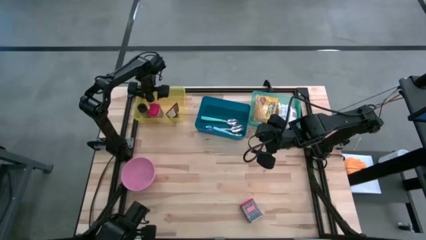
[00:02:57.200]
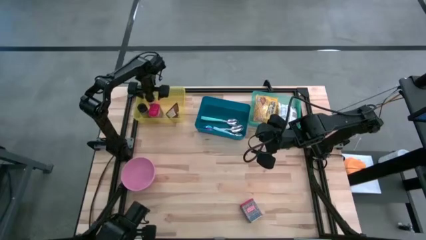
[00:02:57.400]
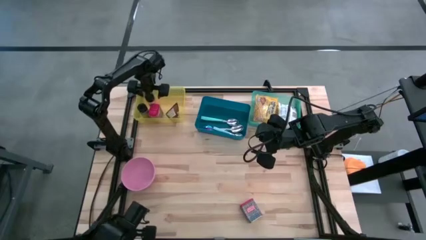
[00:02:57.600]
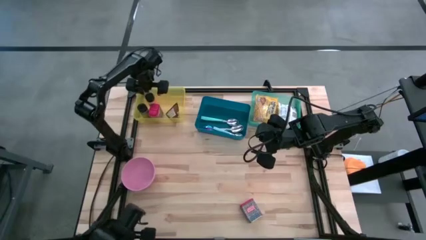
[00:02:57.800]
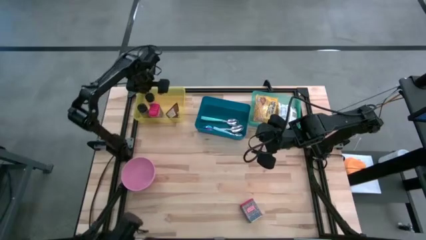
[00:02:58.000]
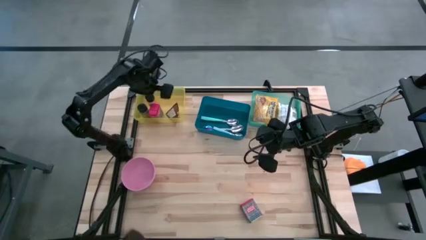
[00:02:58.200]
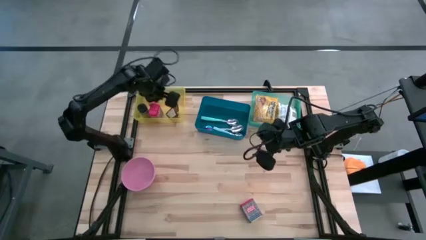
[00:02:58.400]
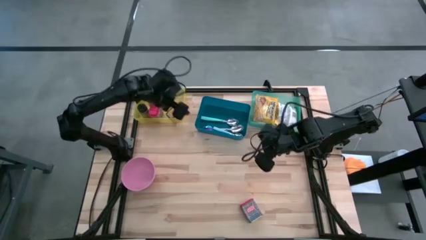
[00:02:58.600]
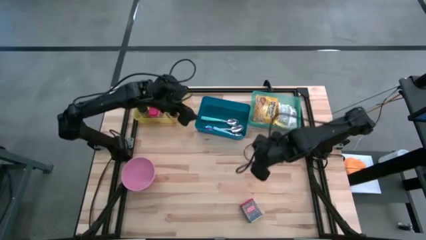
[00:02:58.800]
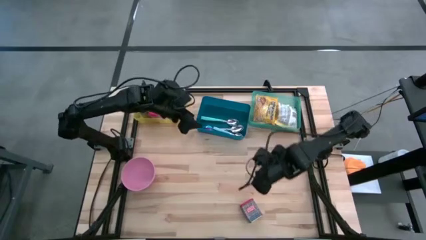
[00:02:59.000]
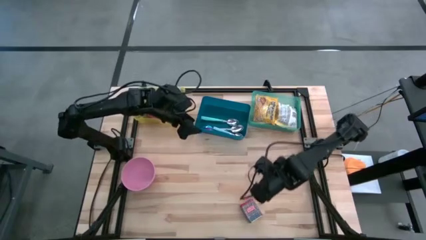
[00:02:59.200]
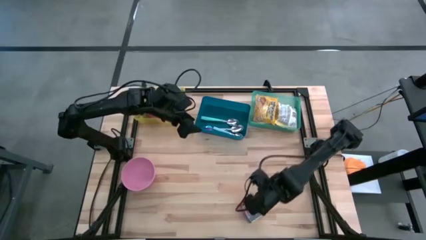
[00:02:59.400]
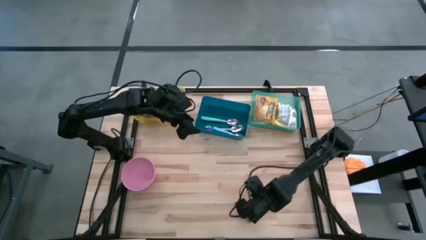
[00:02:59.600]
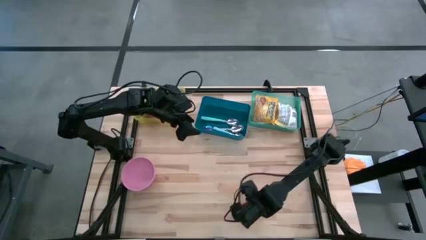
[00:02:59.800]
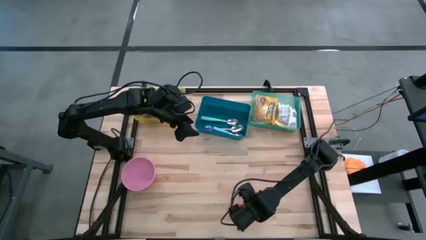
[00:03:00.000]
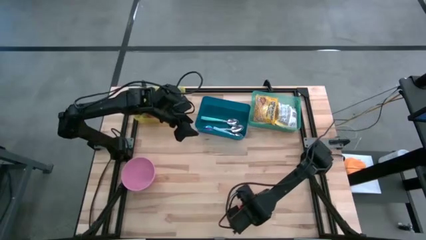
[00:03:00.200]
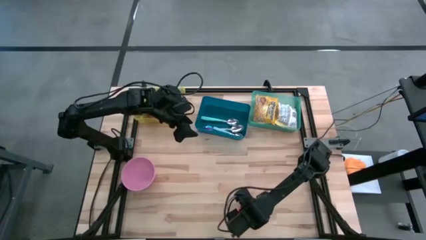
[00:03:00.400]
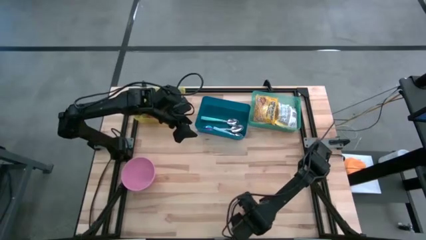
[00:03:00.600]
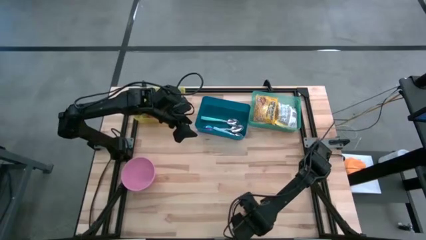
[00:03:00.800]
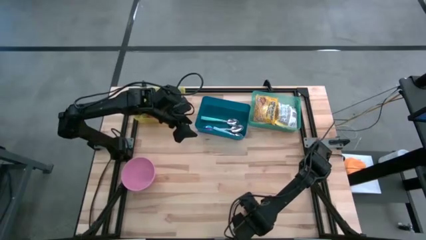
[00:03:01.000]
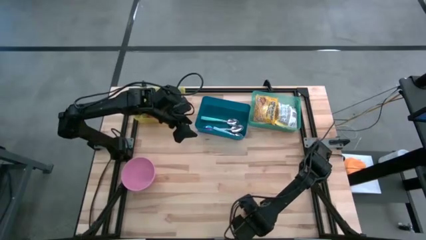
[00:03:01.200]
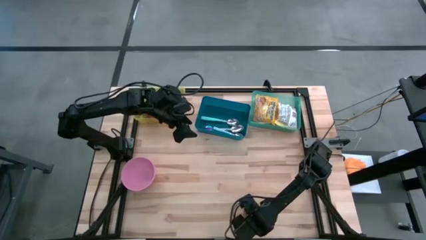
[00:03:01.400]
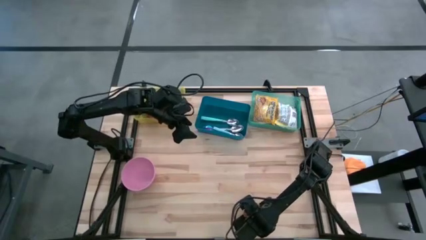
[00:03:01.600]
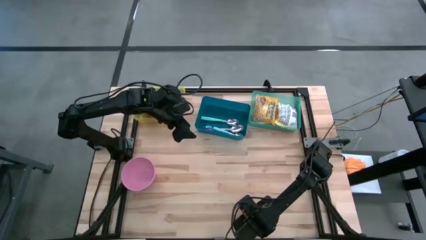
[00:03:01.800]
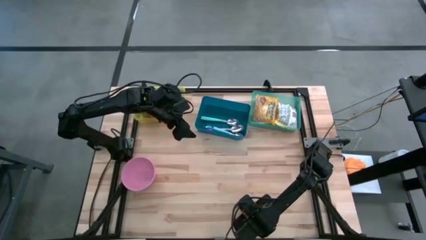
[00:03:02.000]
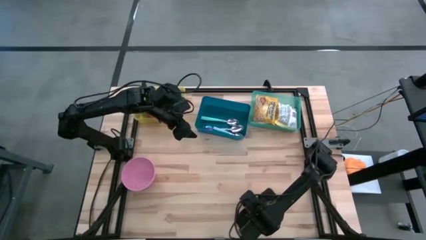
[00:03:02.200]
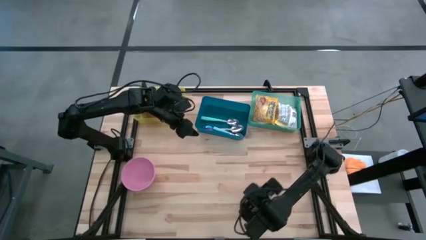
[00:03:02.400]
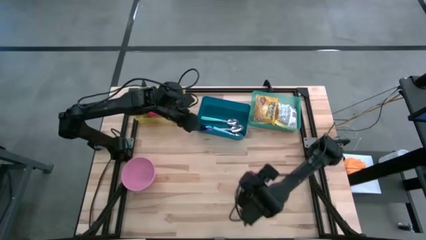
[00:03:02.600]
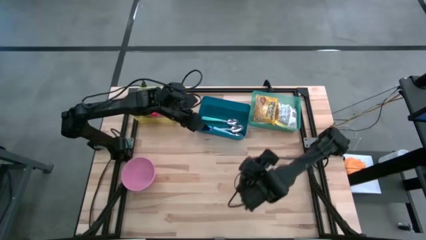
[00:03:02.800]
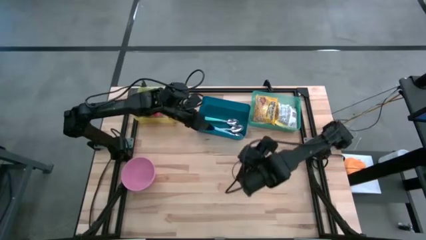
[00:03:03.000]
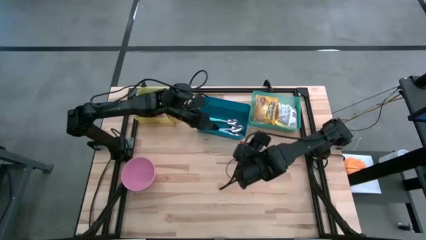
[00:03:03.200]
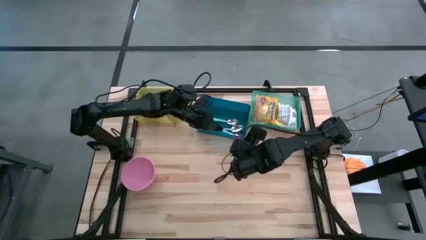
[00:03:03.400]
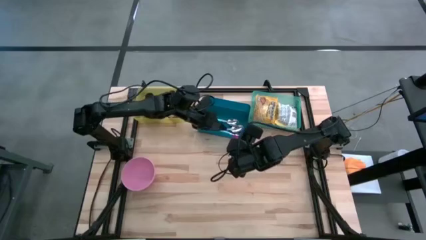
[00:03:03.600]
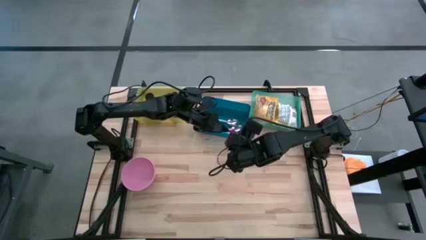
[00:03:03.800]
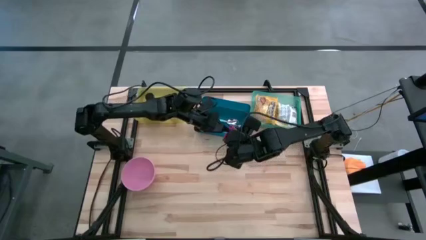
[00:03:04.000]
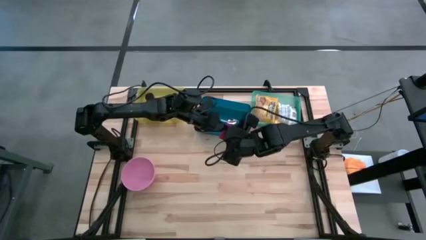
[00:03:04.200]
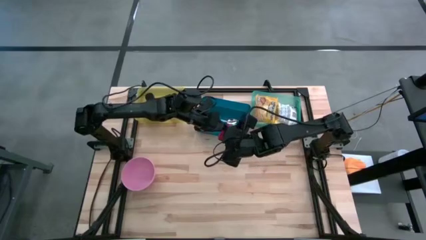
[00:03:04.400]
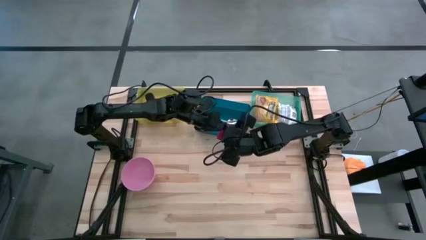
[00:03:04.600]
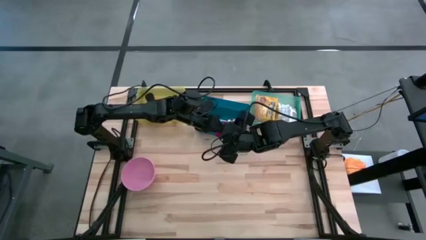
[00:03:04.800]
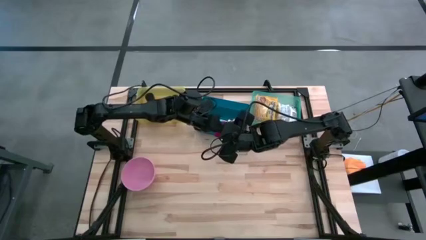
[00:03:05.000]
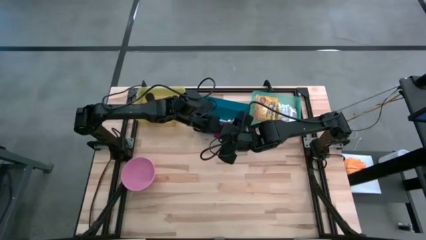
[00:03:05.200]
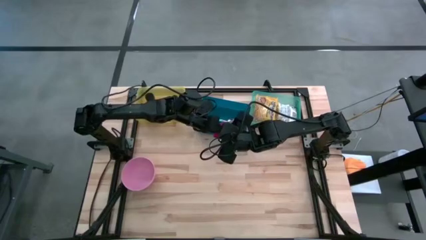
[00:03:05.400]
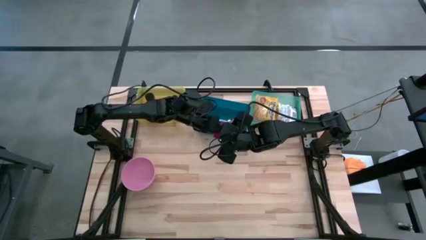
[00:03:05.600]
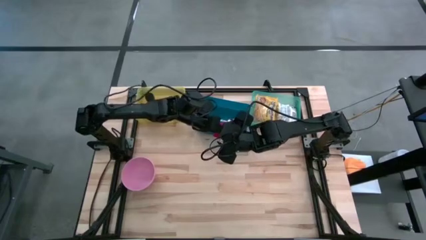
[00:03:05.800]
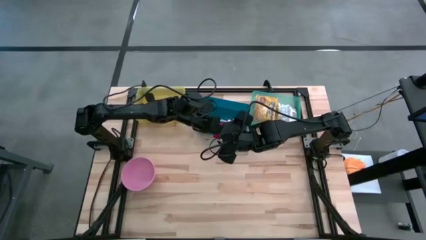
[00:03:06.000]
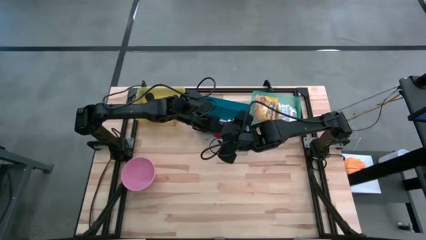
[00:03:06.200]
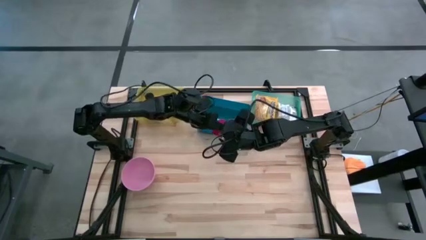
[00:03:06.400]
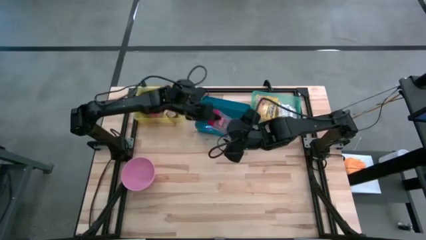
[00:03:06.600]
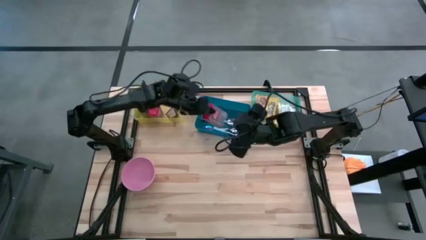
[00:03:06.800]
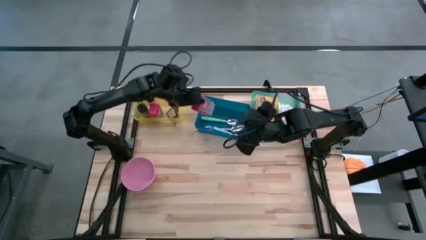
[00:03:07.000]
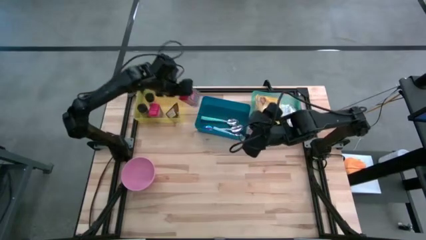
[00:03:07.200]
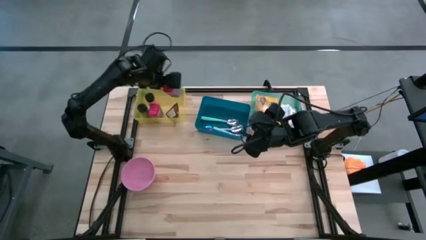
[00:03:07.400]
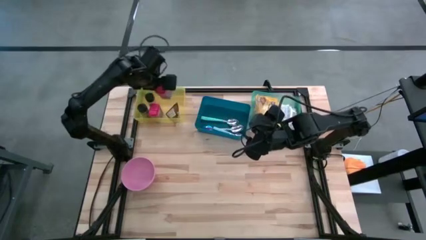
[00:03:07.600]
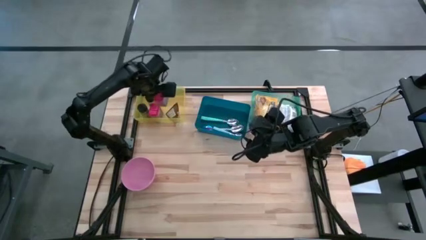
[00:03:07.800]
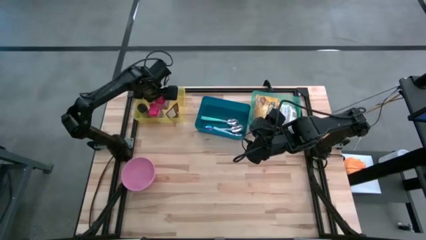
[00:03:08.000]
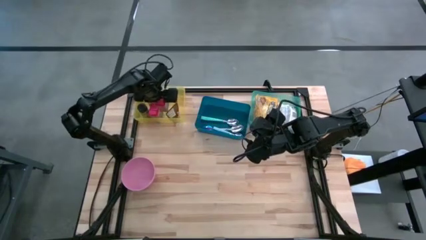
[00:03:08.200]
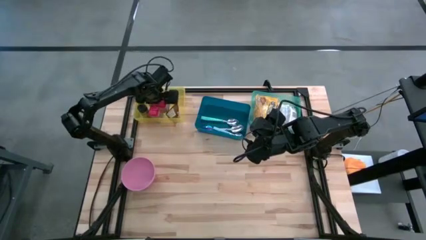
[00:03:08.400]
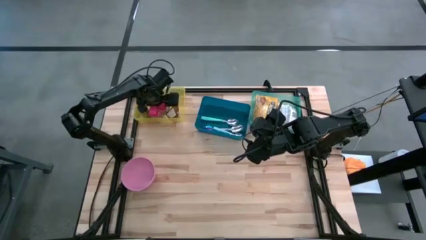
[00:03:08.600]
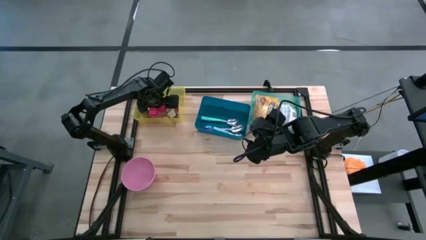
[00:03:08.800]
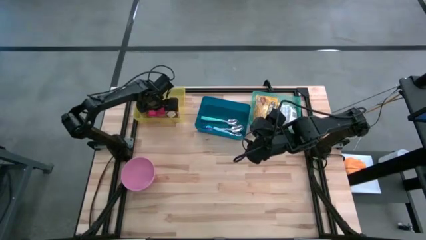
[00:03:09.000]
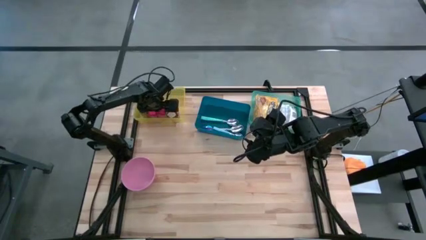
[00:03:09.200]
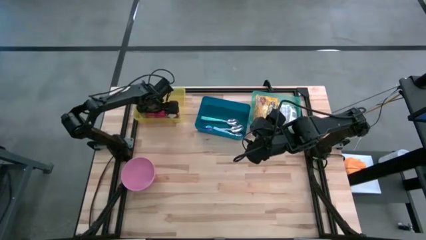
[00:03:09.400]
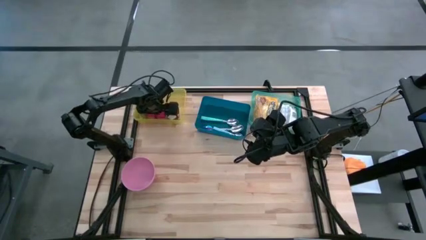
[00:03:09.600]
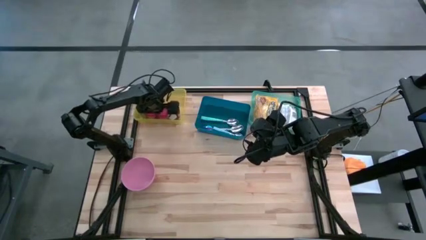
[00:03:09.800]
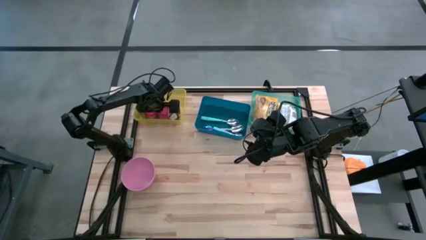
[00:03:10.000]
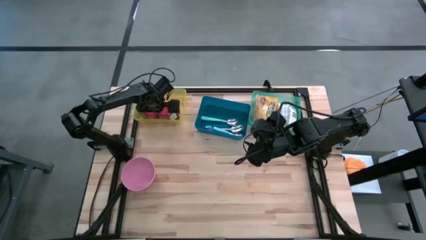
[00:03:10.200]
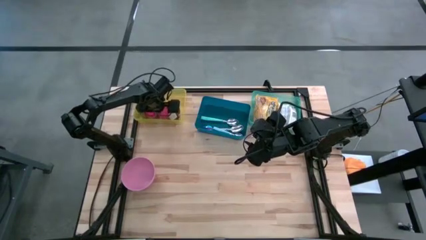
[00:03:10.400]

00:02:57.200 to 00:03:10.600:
Put the red seasoning can into the yellow bin
